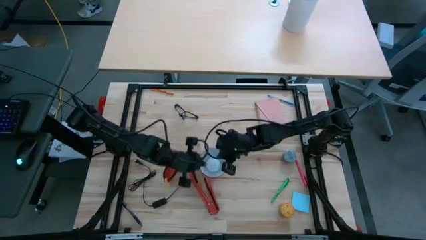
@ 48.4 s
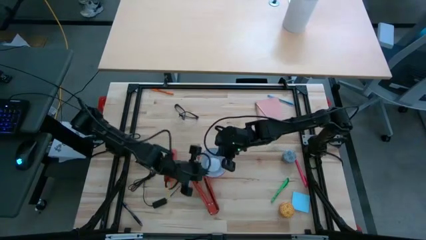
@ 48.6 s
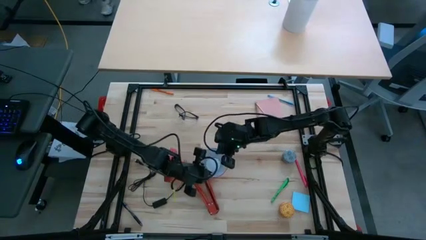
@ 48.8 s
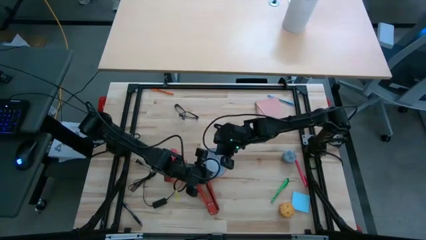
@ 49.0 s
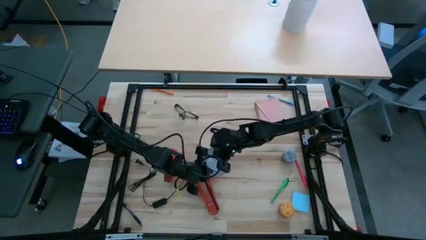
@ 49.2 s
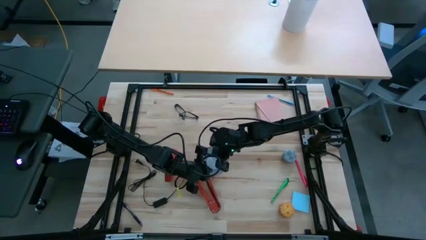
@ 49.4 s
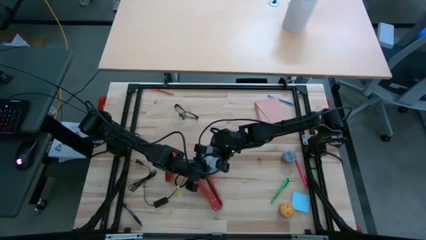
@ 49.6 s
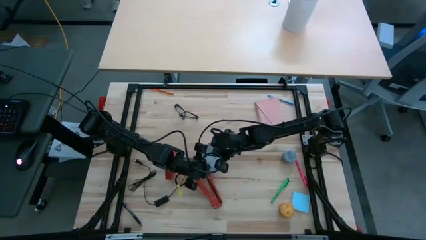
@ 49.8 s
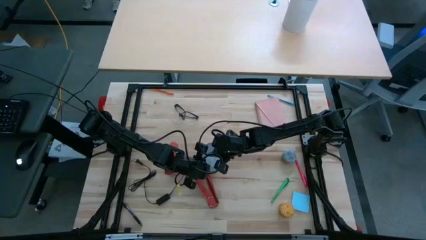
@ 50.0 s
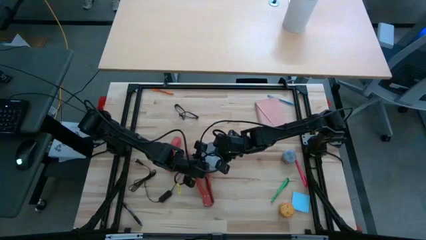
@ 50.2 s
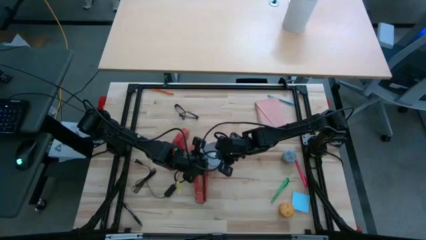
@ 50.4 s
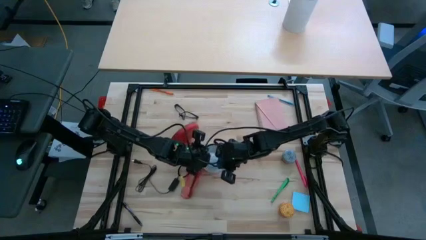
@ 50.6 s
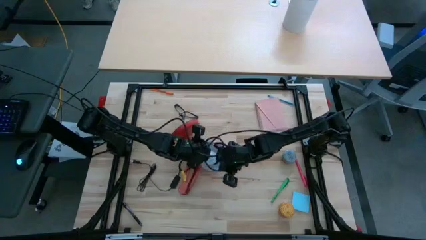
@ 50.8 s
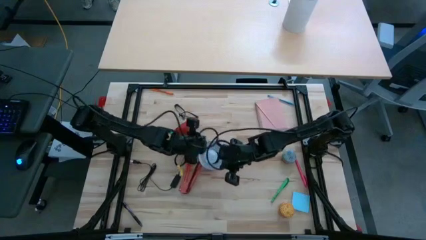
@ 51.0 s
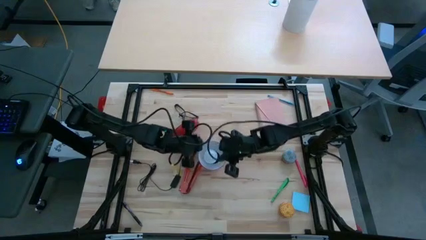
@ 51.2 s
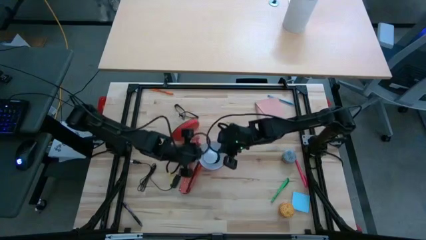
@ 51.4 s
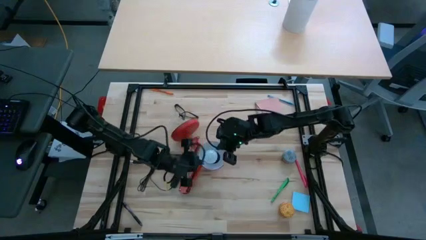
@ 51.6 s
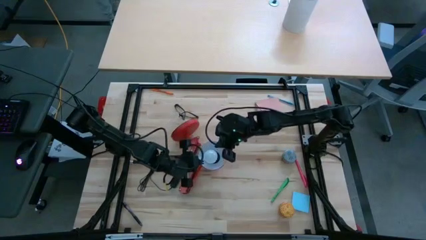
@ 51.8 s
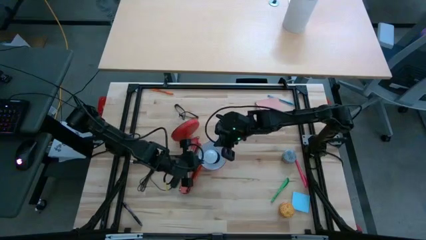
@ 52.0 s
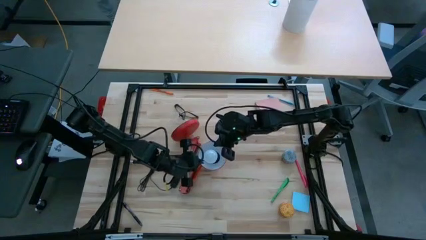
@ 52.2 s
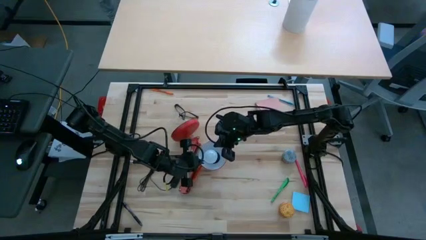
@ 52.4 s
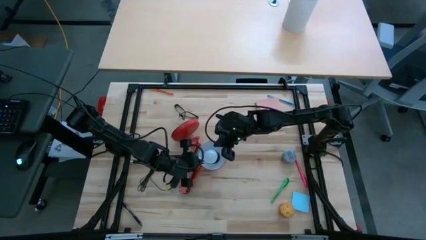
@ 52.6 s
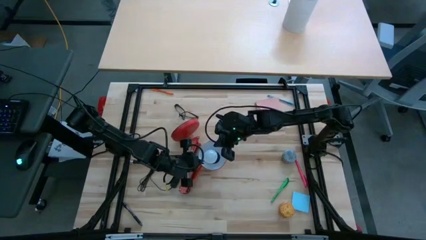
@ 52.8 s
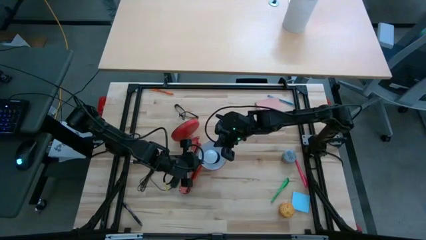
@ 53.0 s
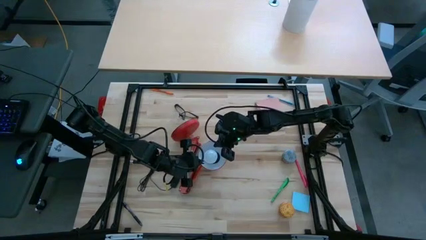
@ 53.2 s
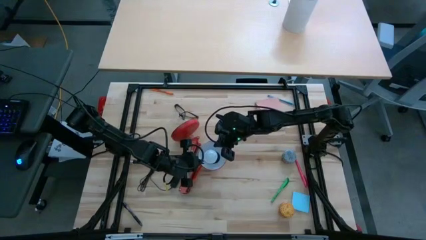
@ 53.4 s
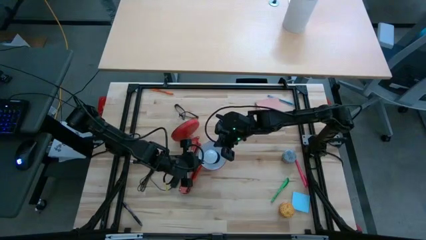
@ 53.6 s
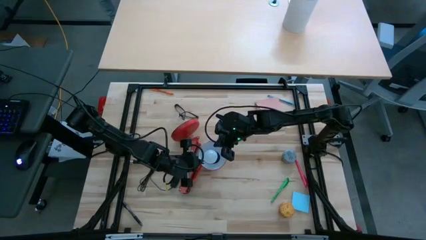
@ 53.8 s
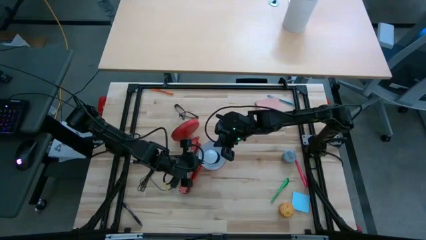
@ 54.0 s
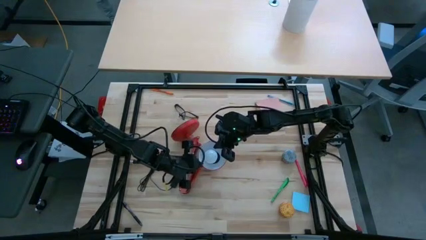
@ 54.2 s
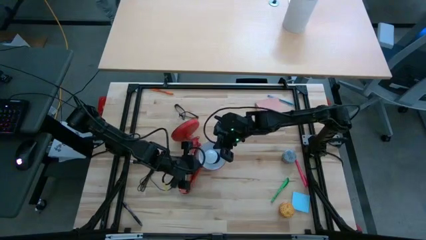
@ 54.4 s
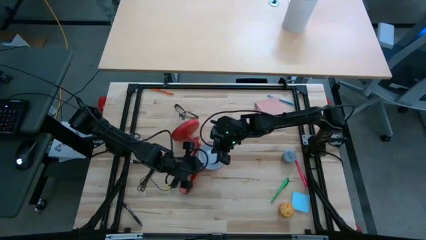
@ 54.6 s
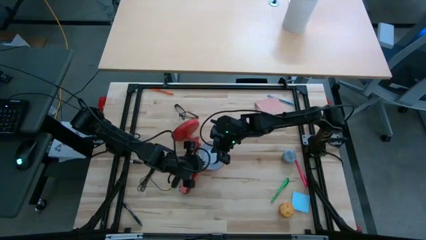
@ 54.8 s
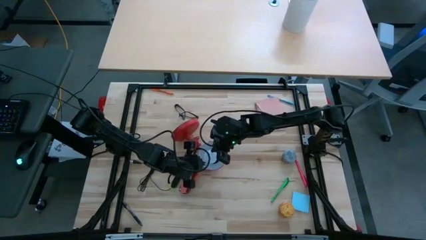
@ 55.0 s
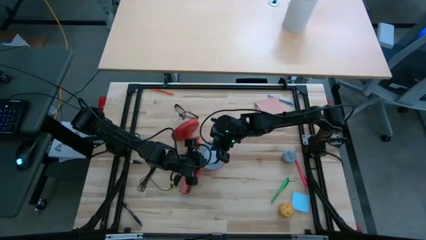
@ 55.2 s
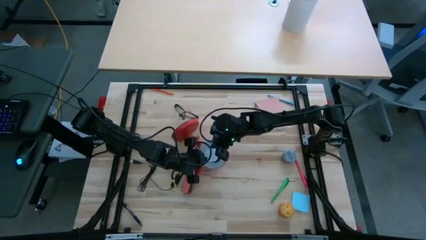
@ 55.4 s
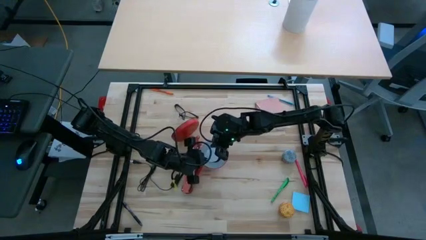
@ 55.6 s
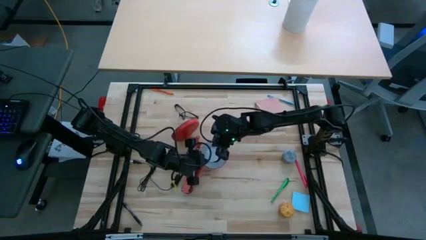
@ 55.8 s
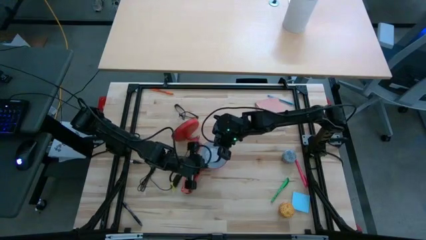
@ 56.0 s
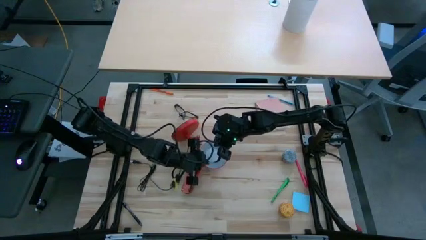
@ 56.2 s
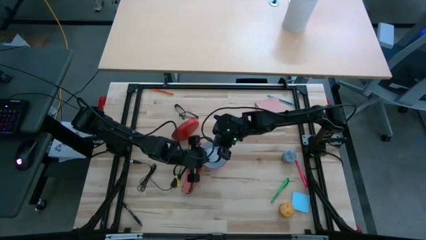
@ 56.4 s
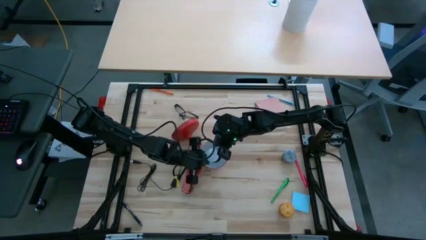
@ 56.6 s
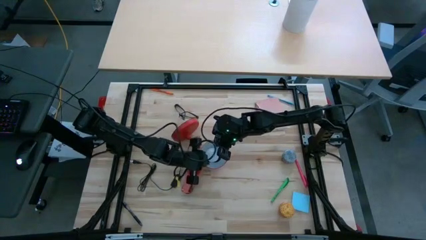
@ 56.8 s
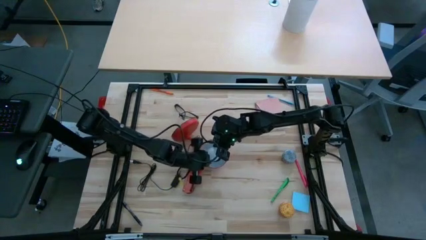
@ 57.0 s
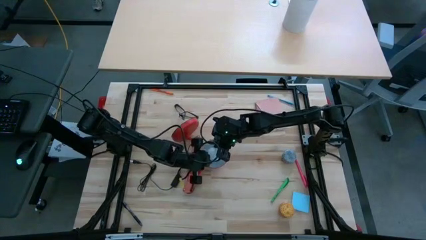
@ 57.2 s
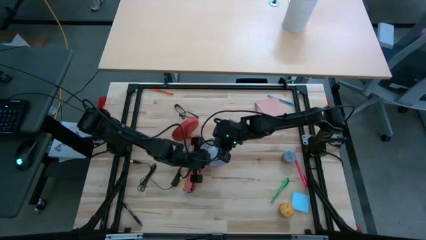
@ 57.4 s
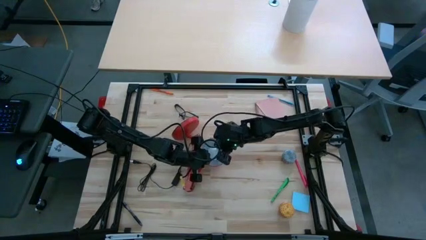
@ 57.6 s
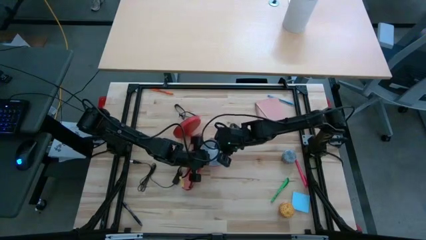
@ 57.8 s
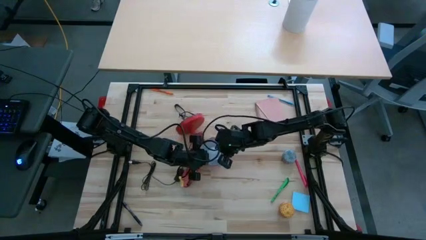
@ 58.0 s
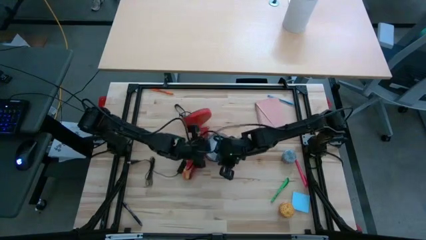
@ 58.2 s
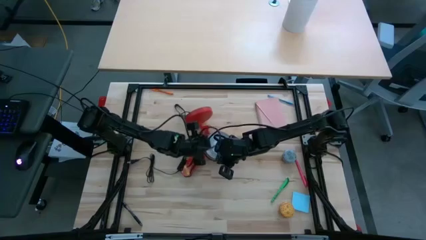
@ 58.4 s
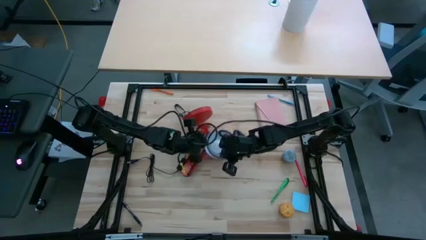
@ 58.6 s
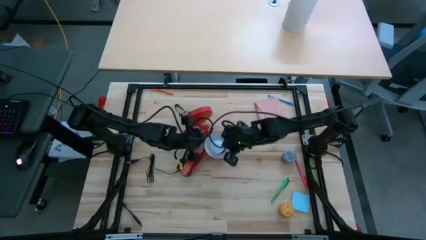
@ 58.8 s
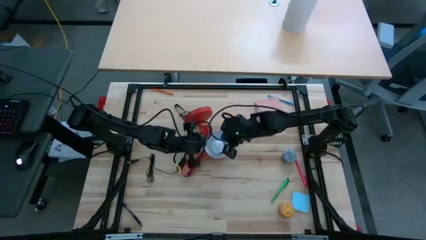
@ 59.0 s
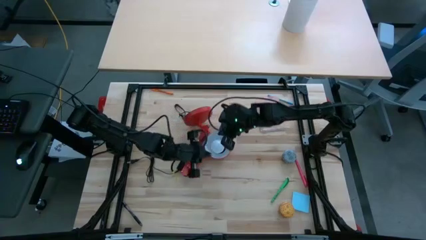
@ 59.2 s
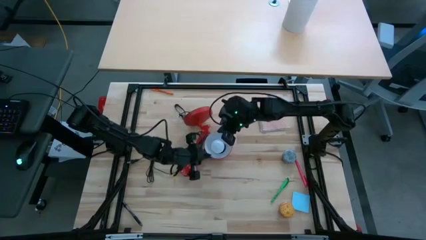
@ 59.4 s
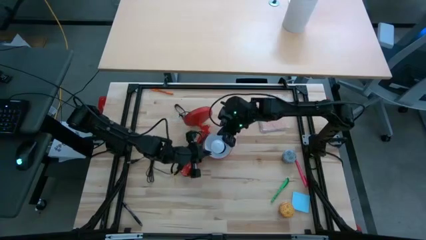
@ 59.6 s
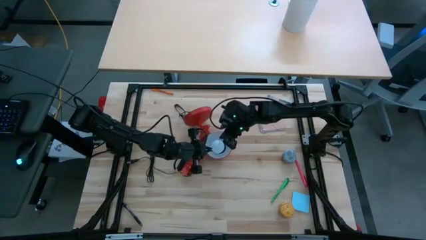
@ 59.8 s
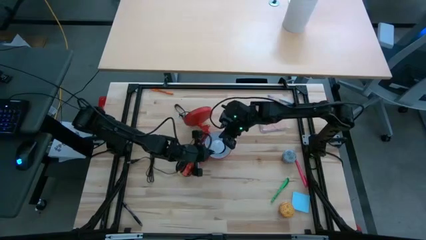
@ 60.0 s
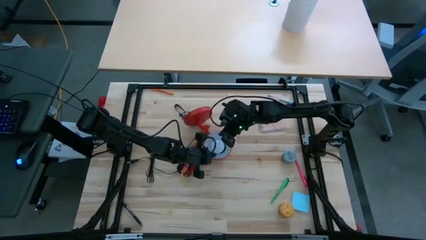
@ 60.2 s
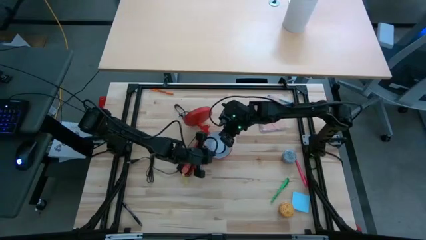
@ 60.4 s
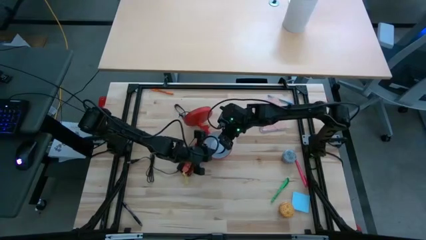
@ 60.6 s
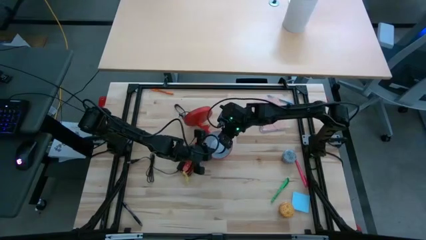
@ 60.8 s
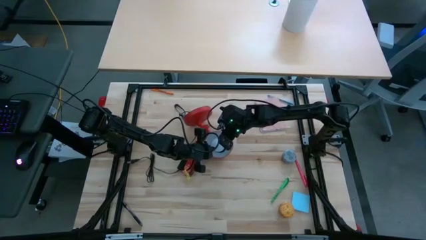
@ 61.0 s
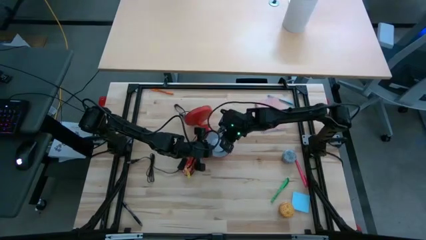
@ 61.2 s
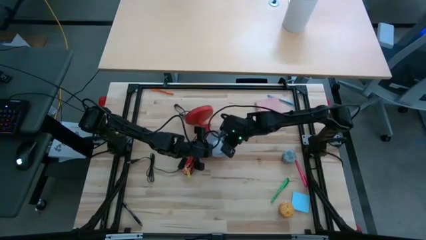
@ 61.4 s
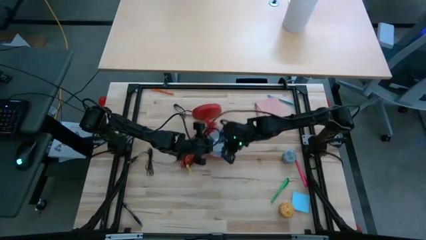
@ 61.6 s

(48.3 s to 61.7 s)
Task: Screw lightbulb
Insert the lightbulb into the lamp
